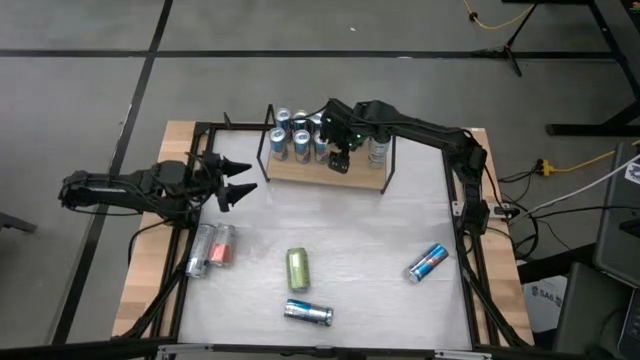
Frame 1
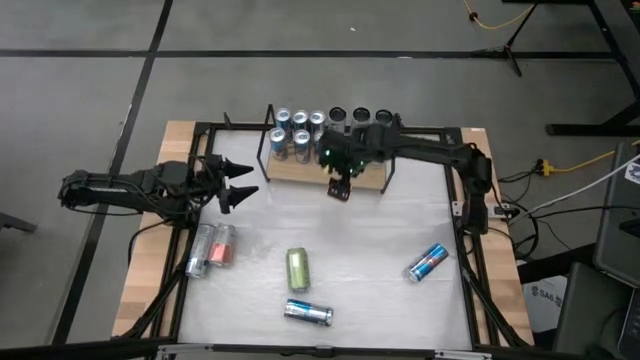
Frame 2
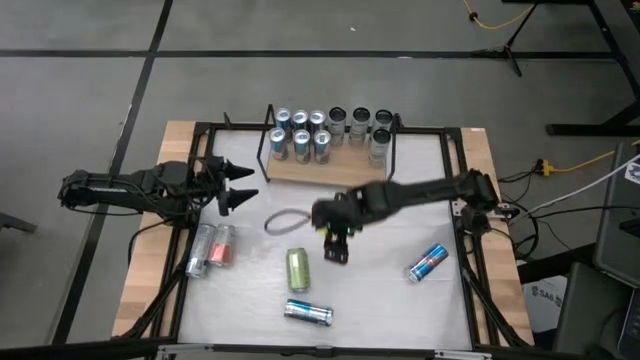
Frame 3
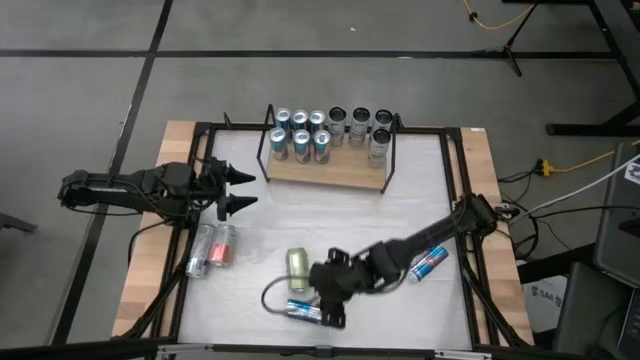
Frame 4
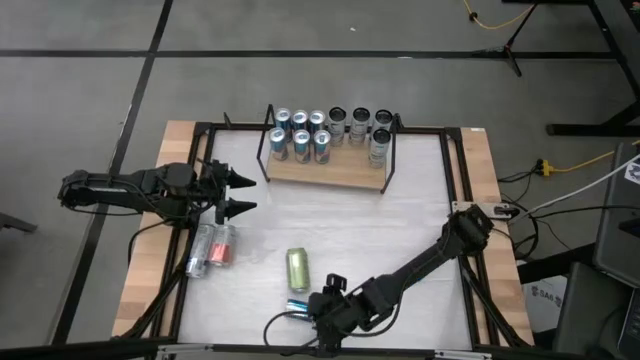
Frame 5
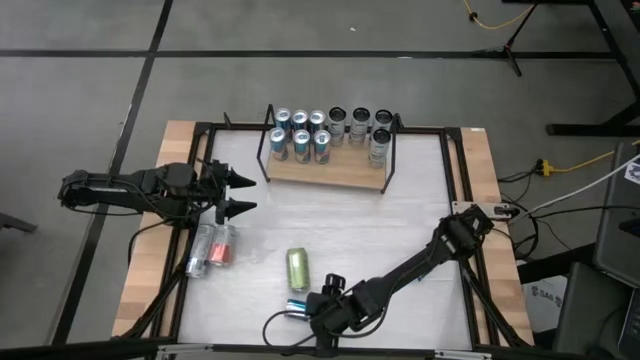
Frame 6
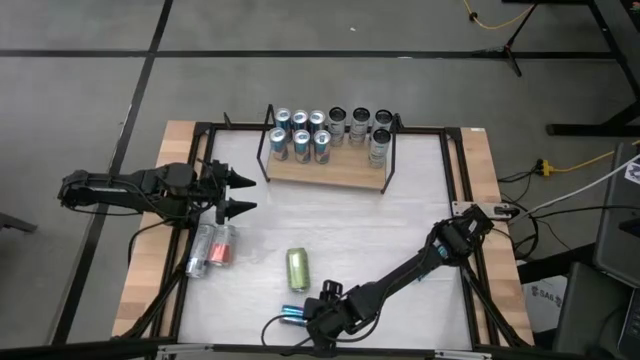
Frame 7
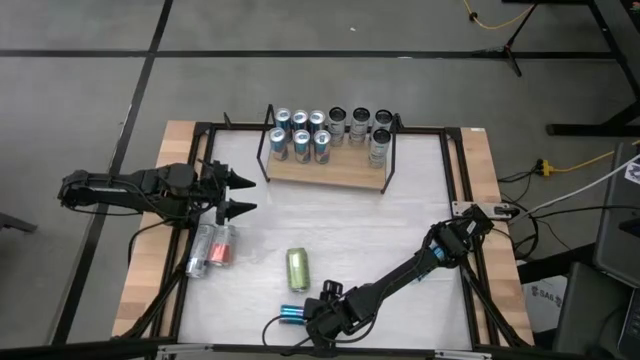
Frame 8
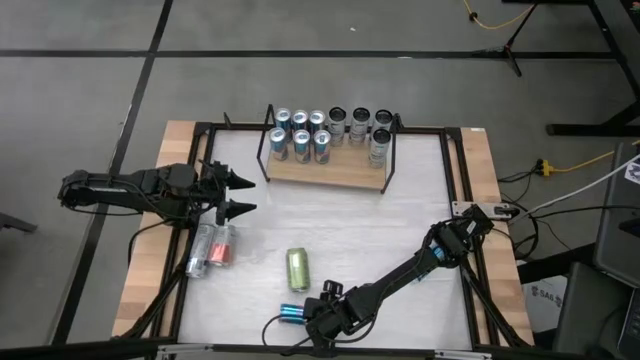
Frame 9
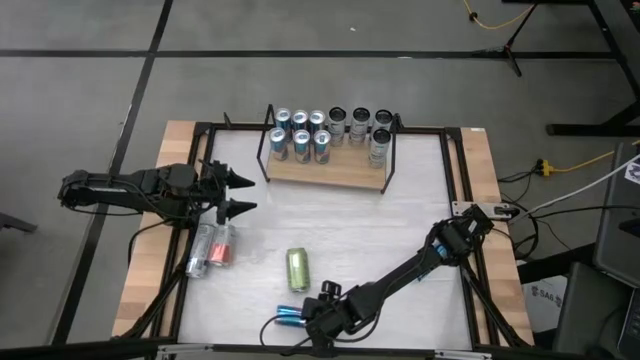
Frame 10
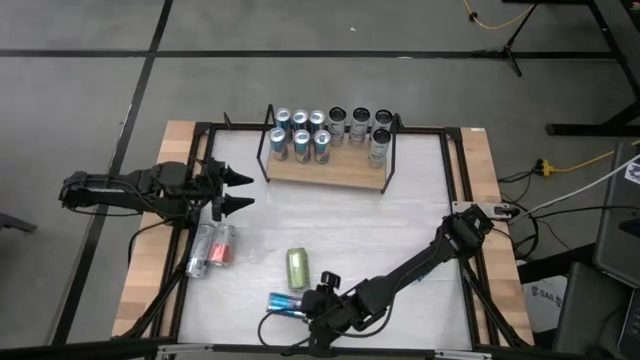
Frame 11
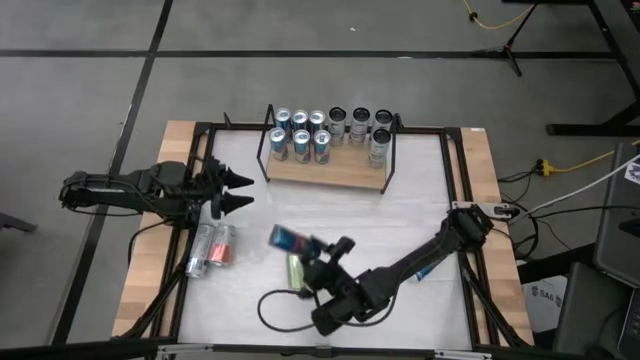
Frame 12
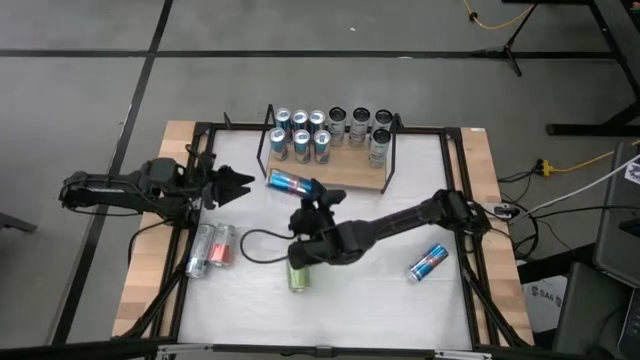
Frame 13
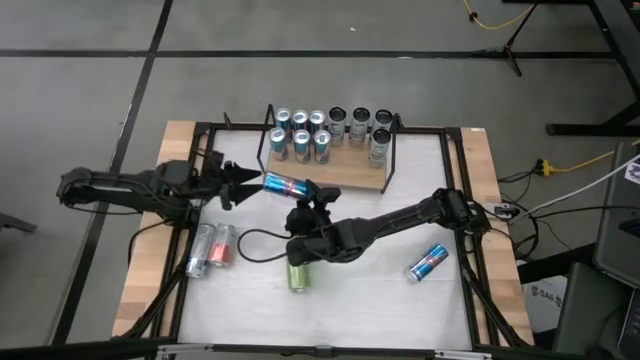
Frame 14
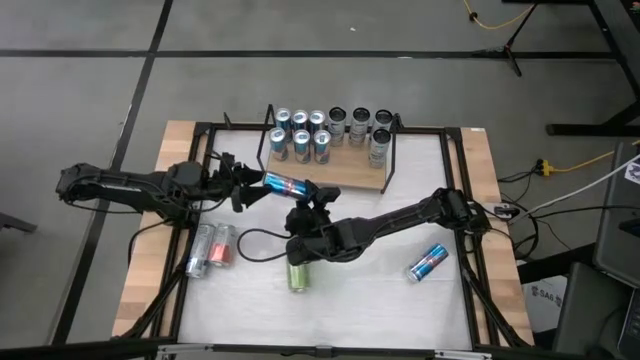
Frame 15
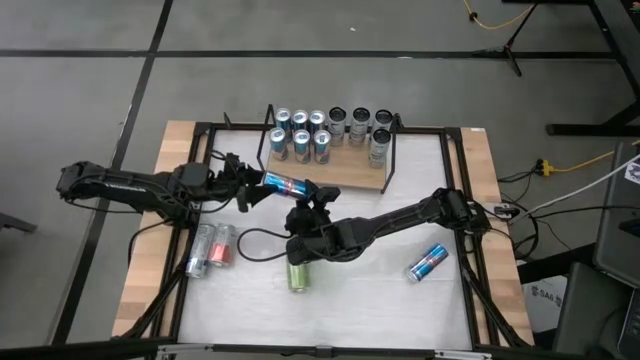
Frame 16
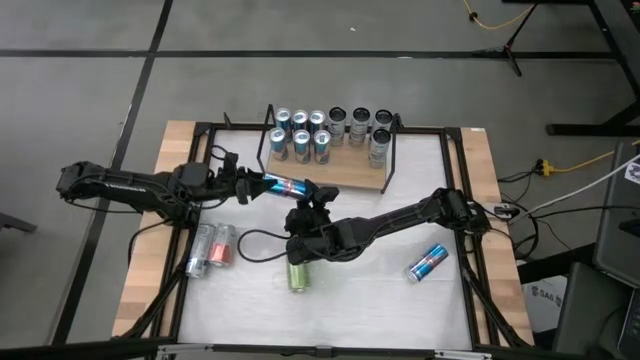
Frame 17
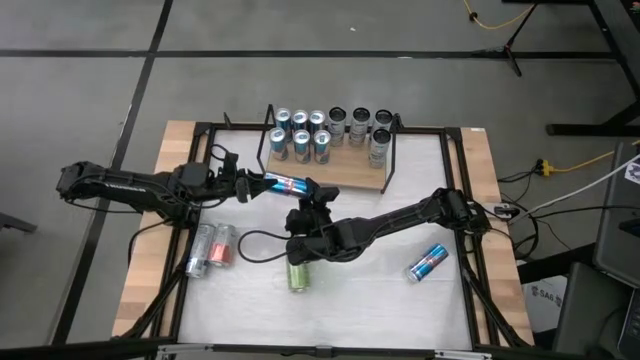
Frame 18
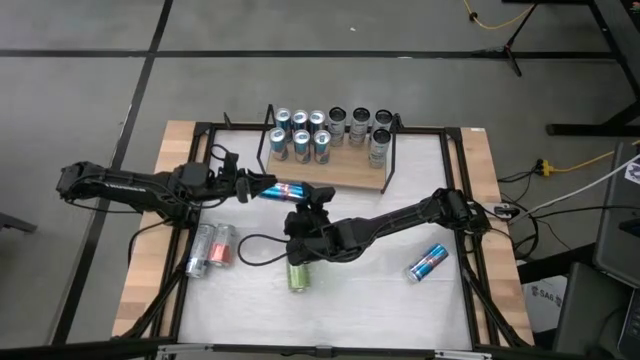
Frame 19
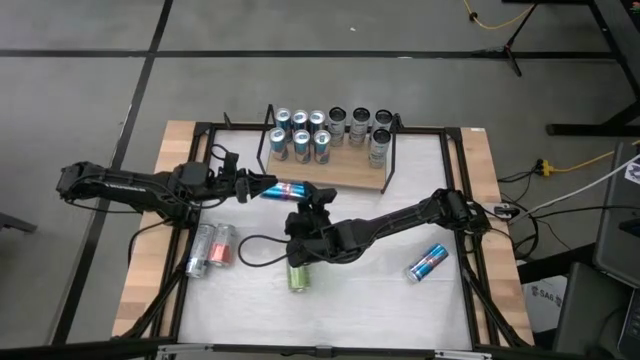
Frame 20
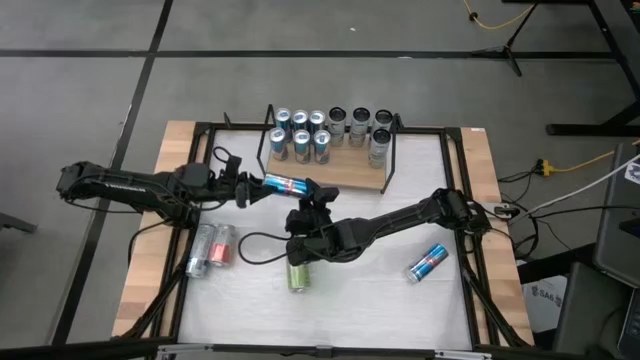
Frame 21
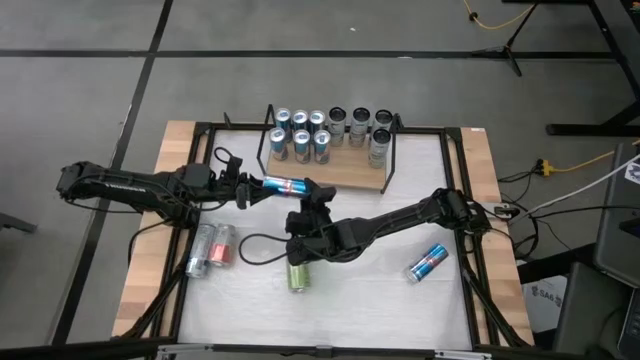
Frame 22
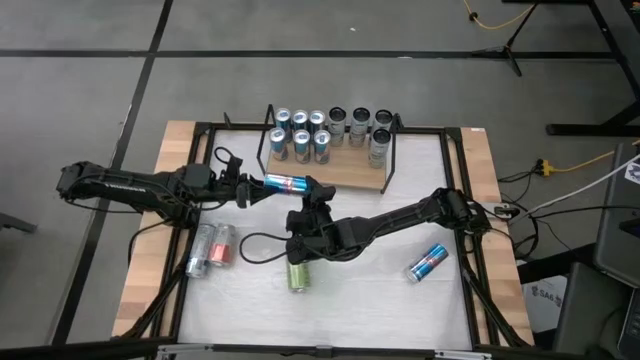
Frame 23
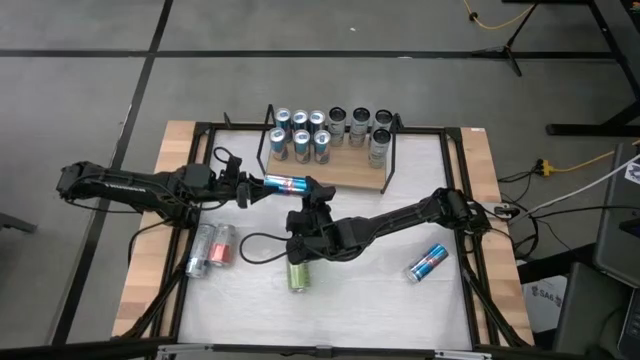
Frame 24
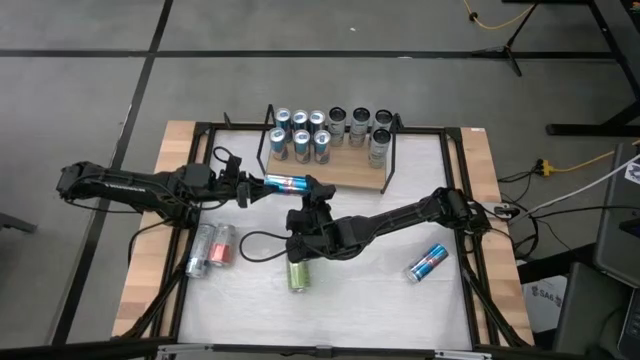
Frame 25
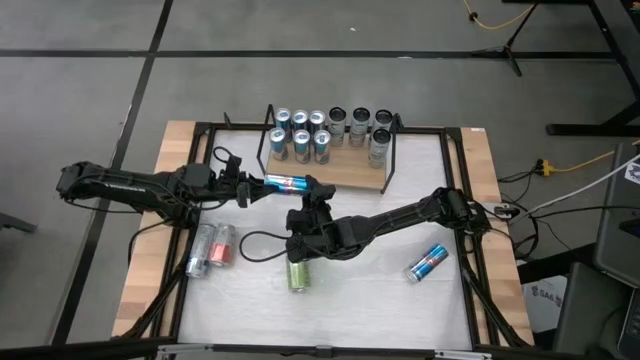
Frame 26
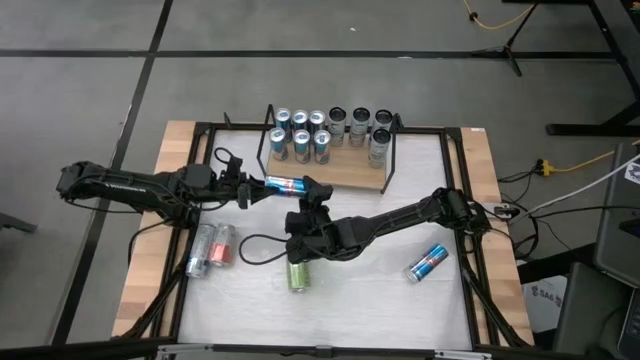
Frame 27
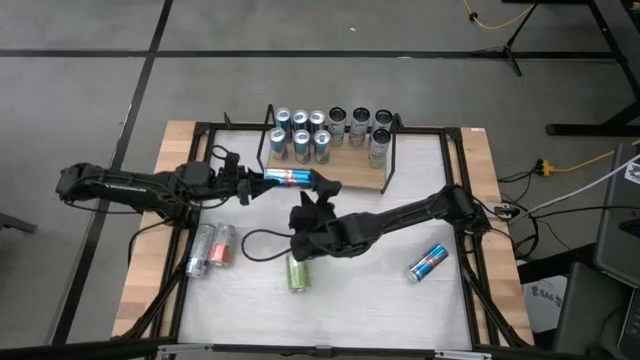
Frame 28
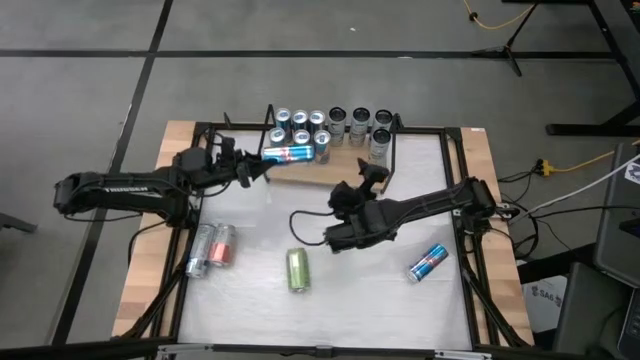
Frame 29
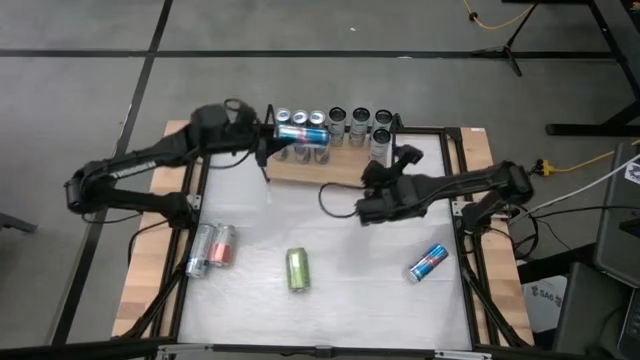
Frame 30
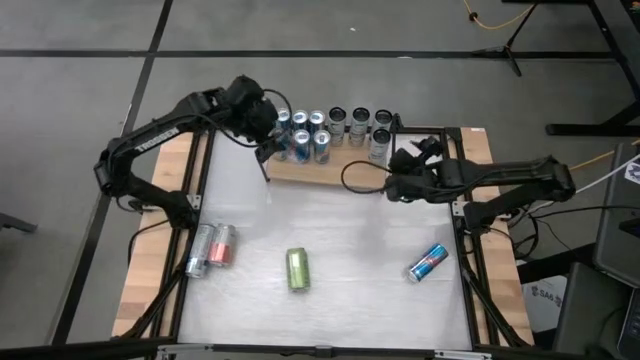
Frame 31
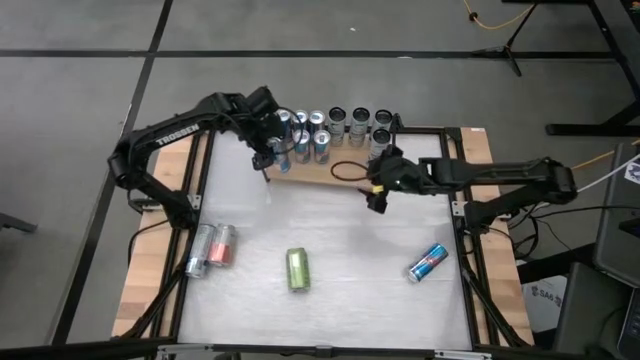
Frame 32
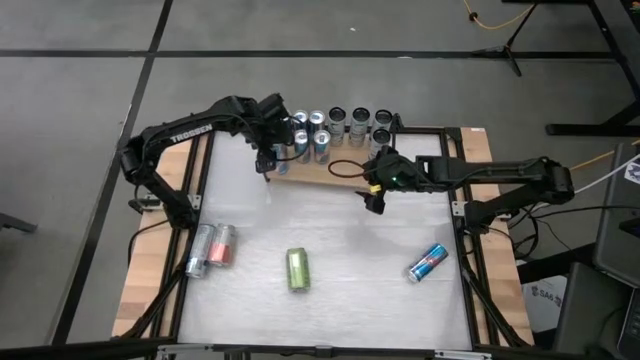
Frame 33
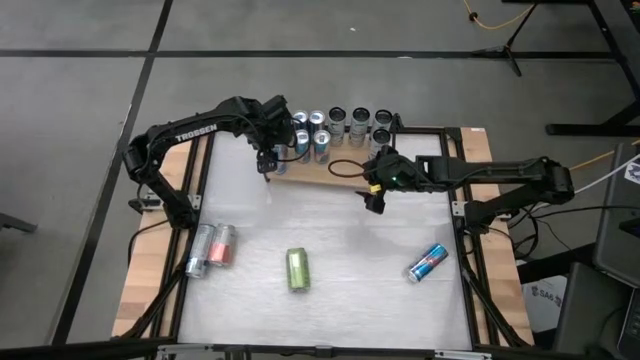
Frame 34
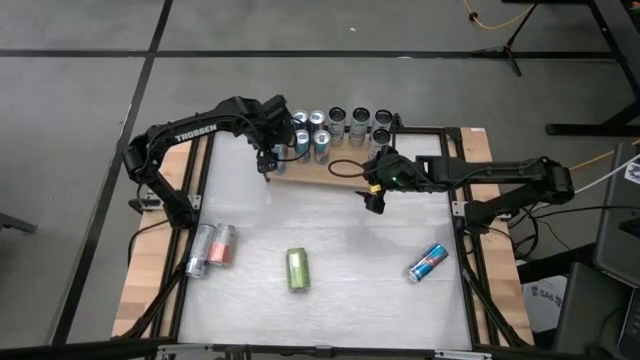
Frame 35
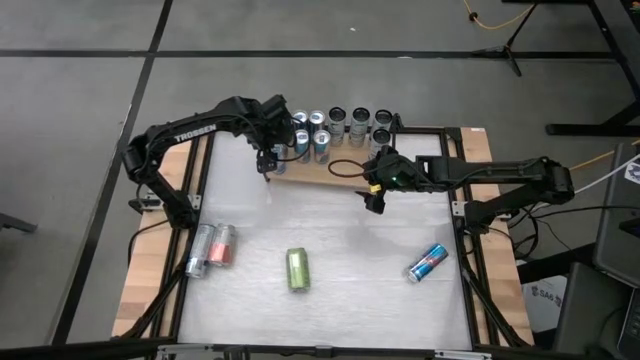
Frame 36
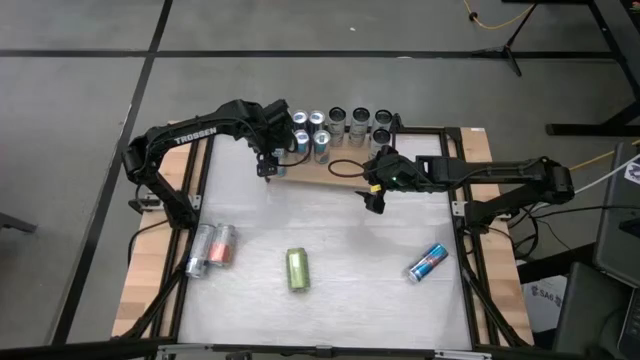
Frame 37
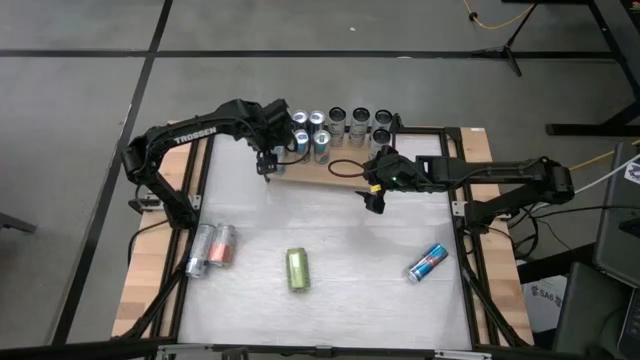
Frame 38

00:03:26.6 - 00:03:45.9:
Task: Place canned beverage on shelf
Put the blue soda can on the shelf aligned with the other blue soda cans

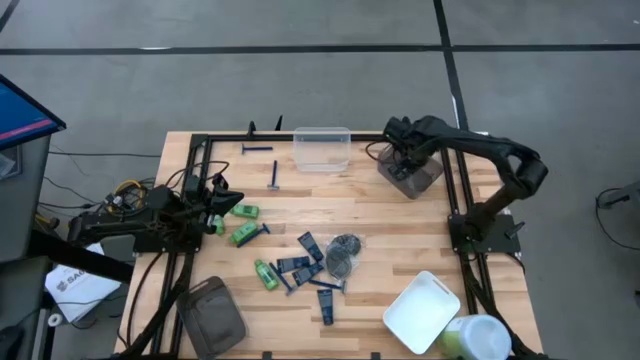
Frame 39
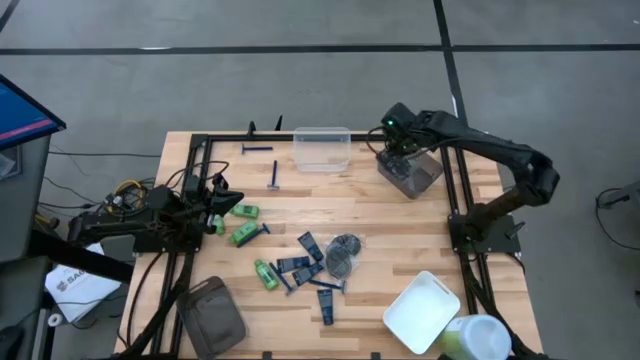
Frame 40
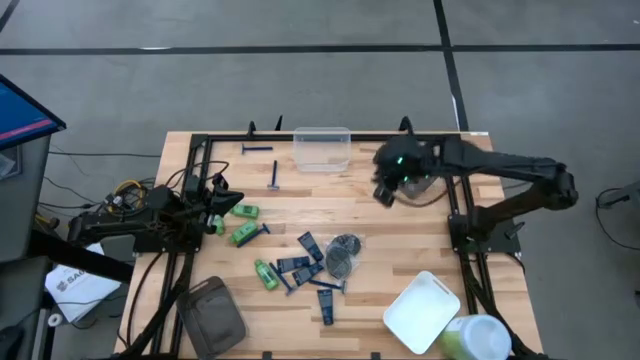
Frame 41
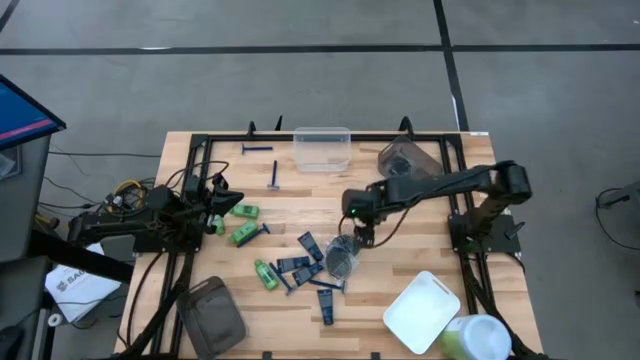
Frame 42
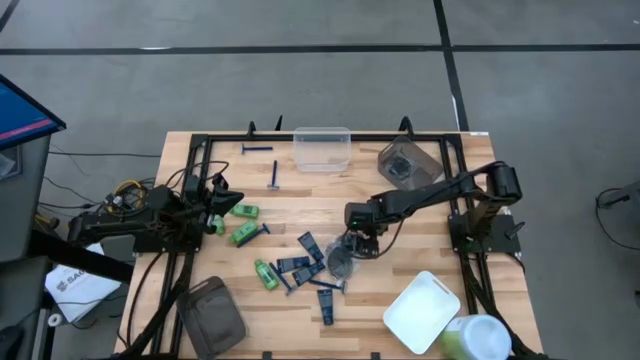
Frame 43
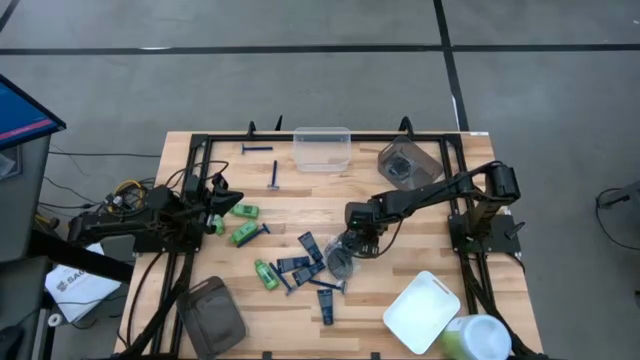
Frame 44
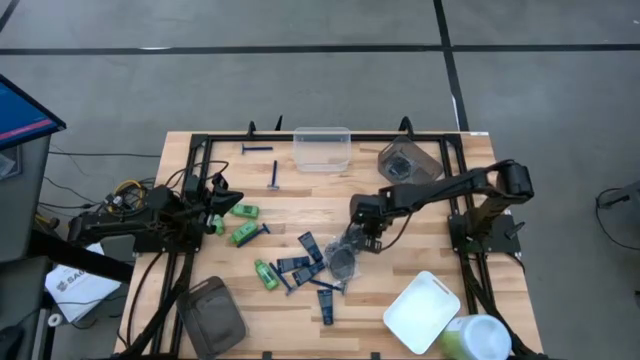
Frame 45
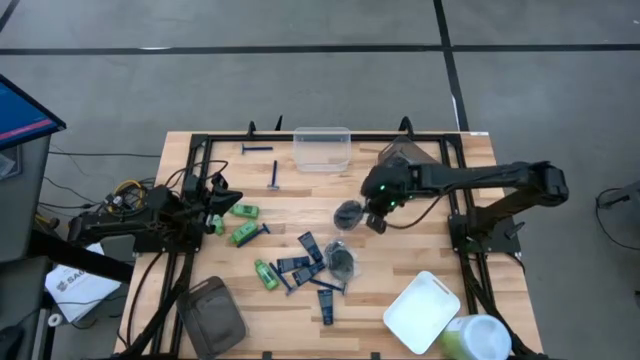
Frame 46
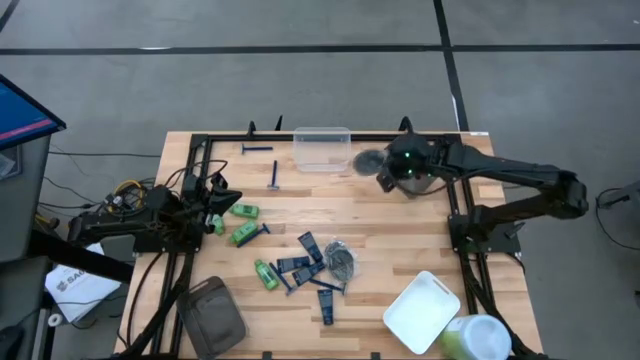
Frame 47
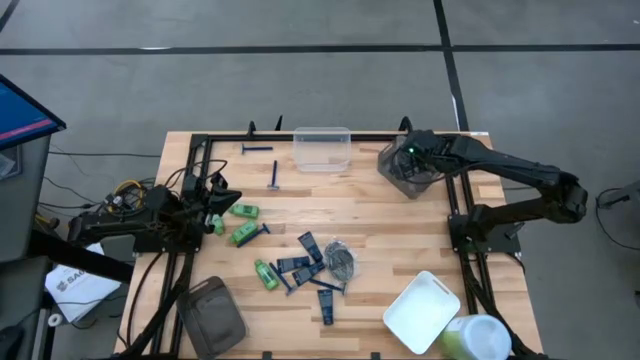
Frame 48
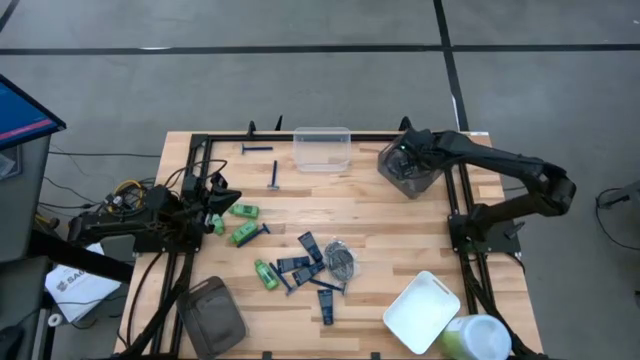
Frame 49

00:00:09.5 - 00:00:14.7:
Task: Pick & Place Travel size toiletries
Put the black hairbrush into the top black bin
